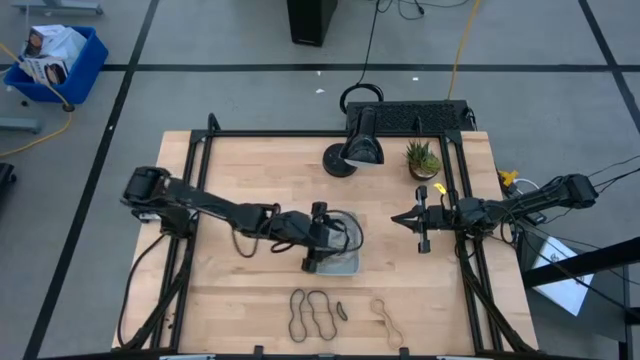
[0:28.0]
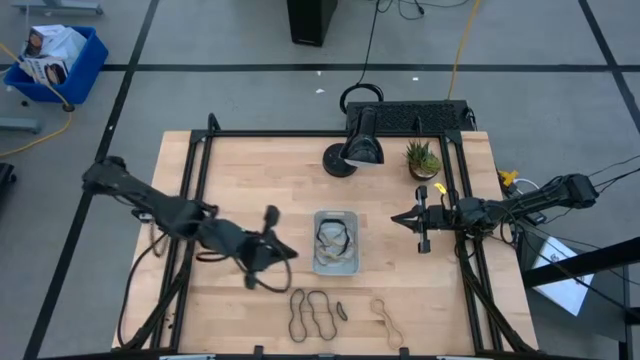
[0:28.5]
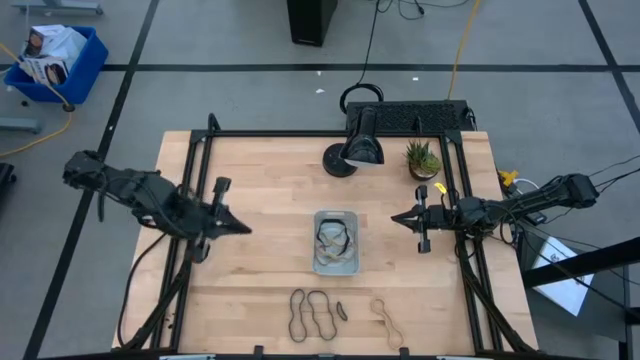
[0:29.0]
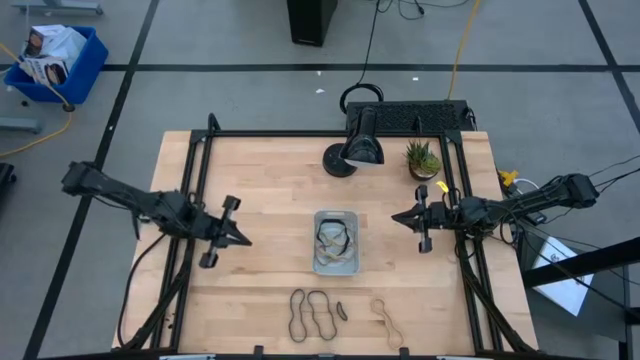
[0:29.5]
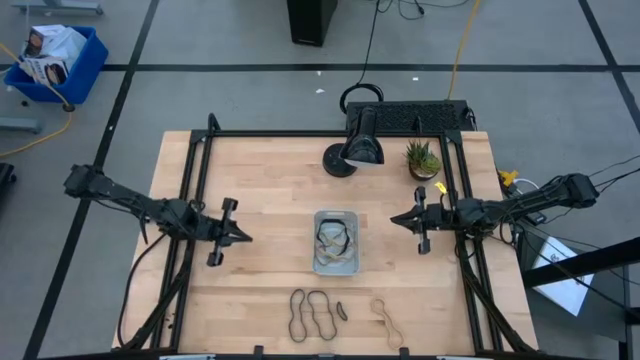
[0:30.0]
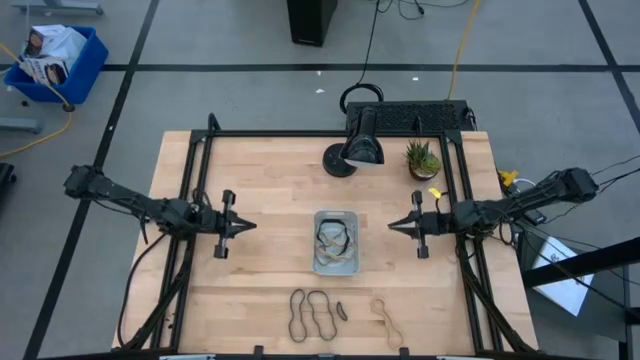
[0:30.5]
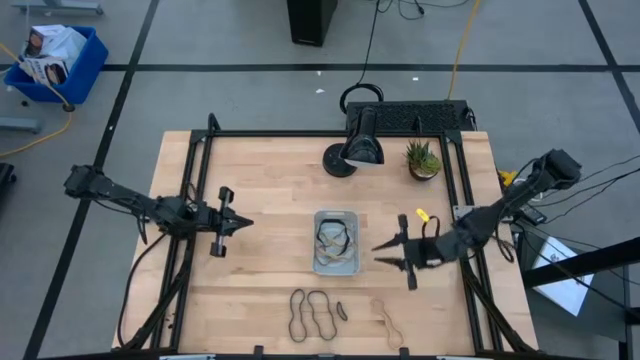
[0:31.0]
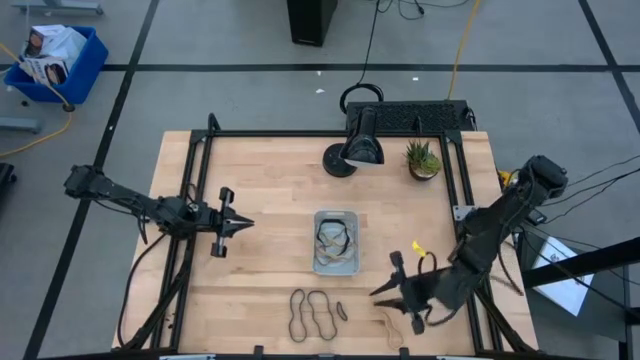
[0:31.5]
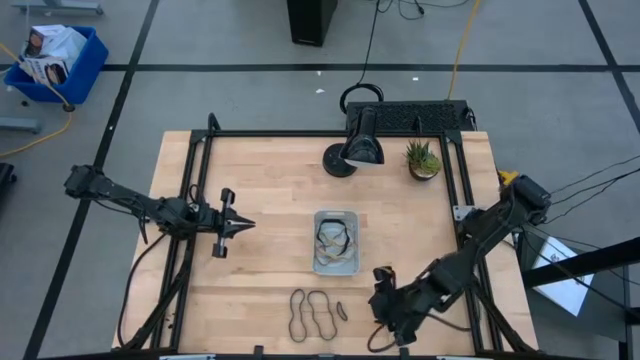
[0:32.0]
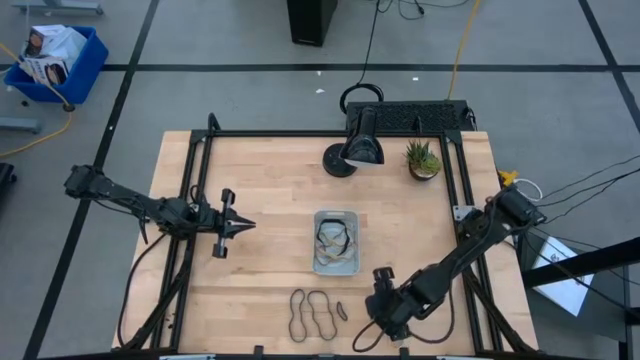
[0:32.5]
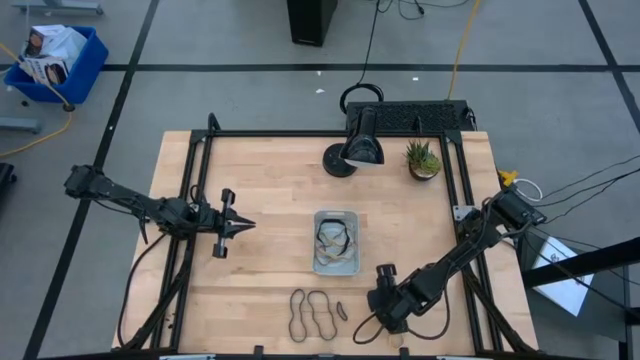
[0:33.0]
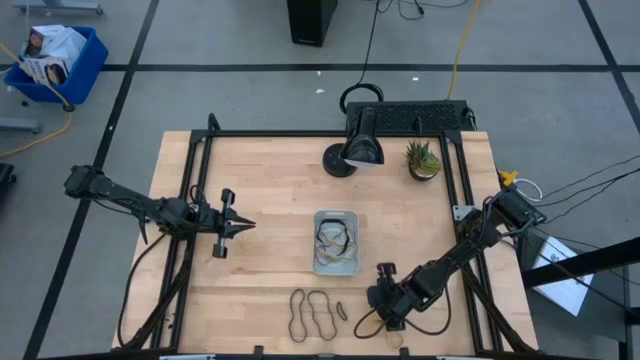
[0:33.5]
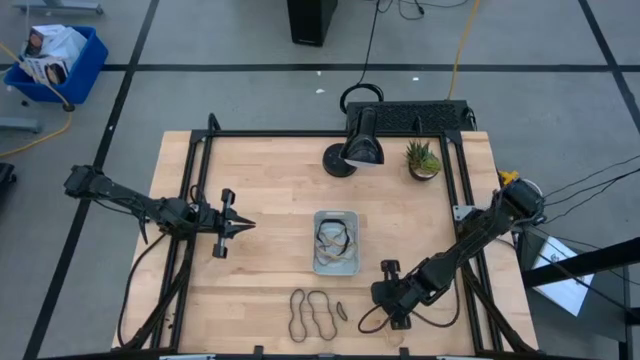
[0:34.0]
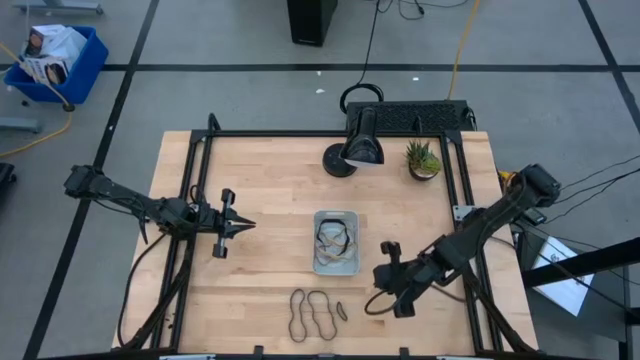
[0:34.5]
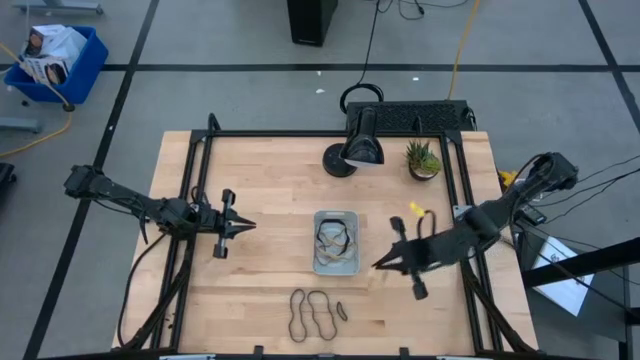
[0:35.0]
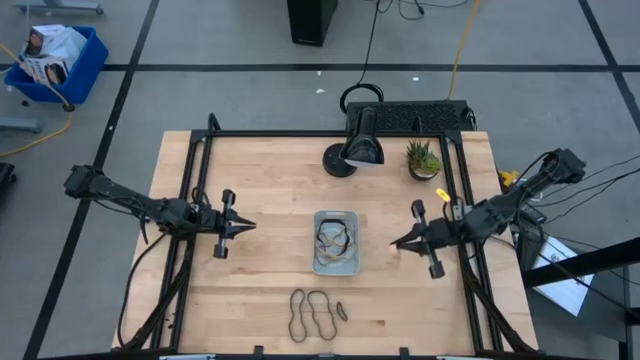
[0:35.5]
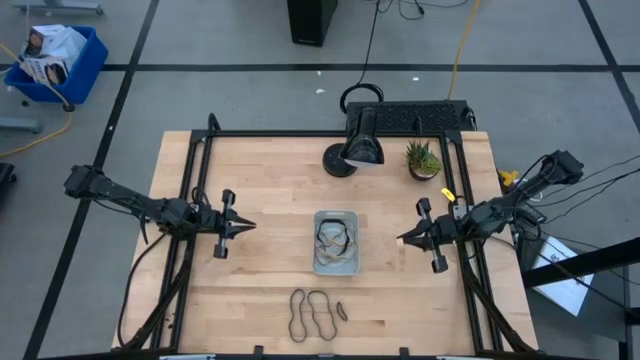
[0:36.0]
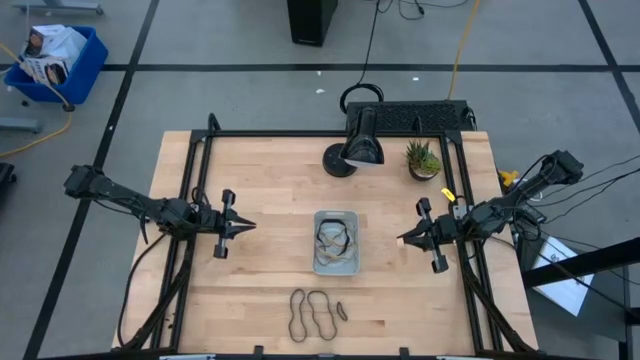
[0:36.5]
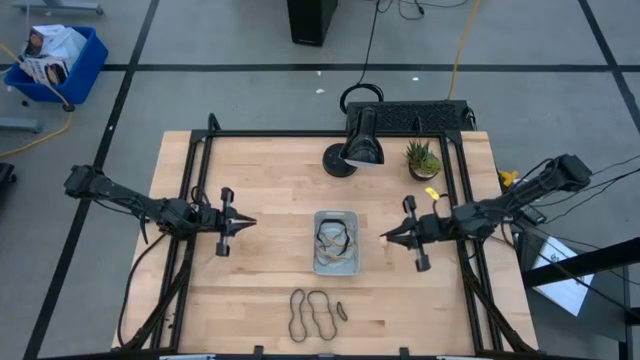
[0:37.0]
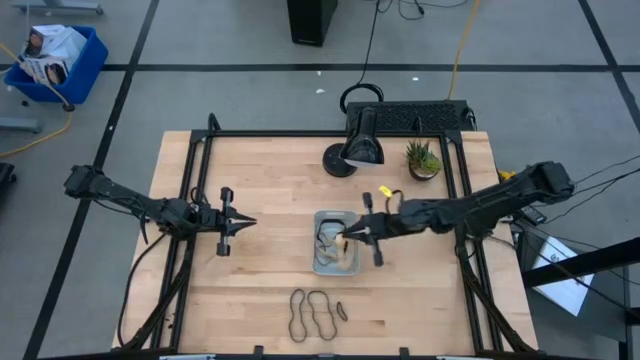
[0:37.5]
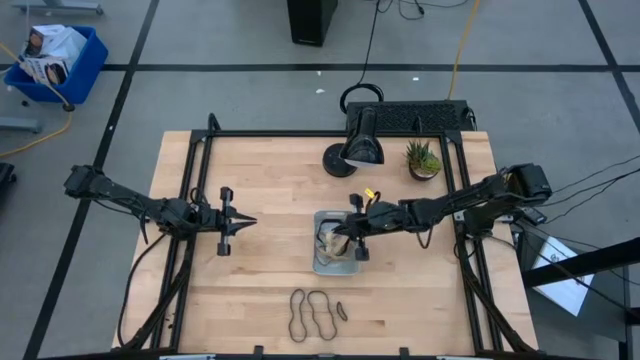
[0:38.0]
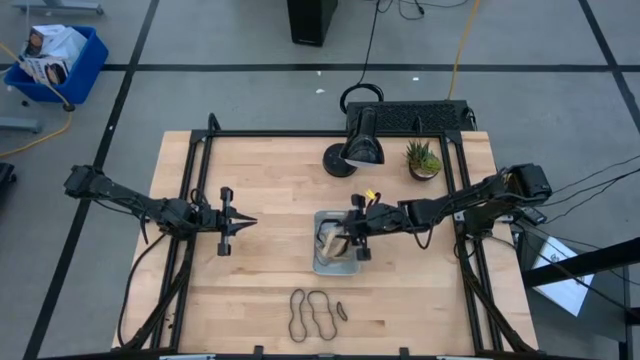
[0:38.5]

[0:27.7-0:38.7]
Task: Pick and place rubber bands into bin
Put the brown rubber band into the gray container

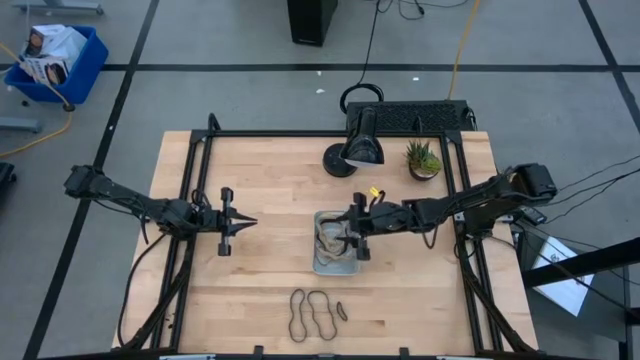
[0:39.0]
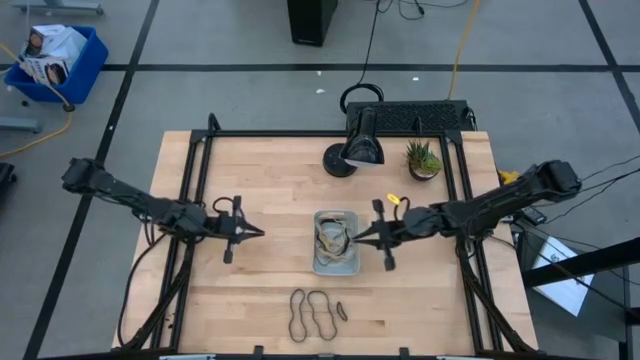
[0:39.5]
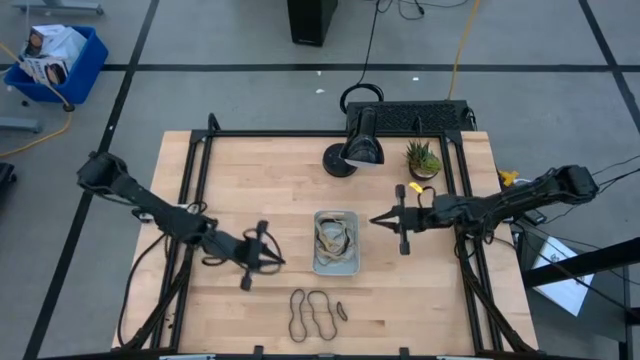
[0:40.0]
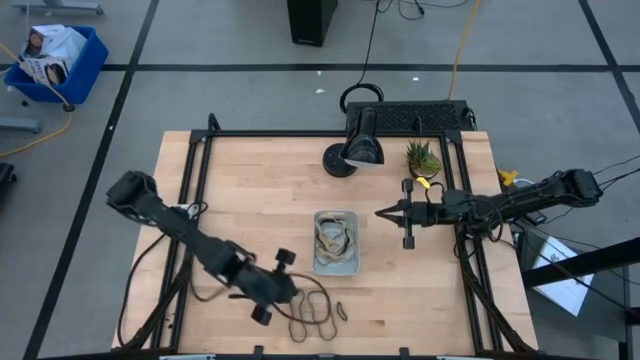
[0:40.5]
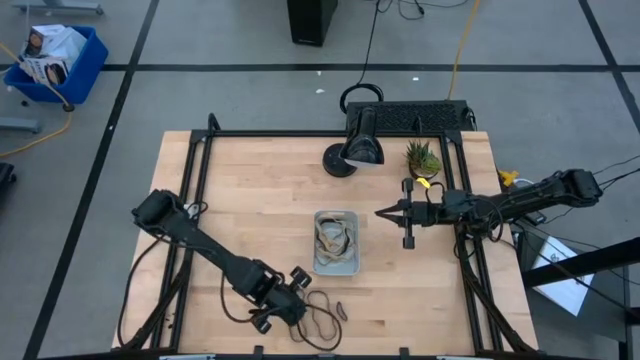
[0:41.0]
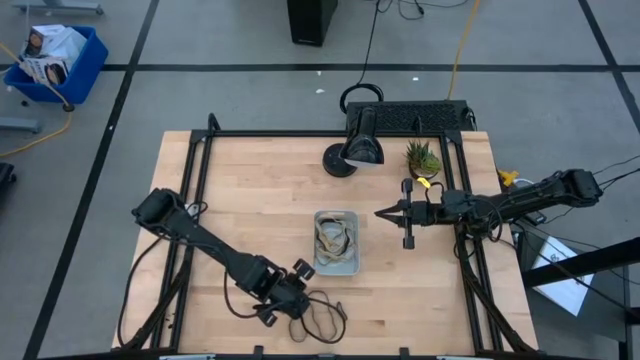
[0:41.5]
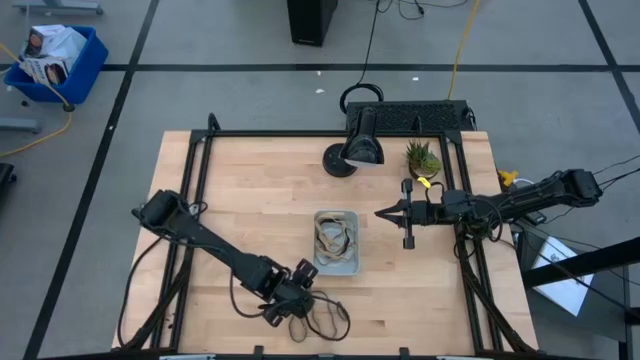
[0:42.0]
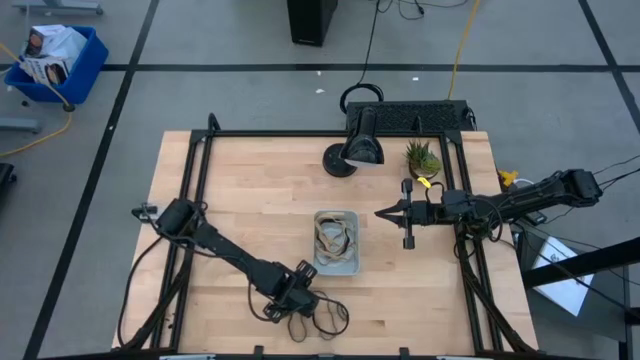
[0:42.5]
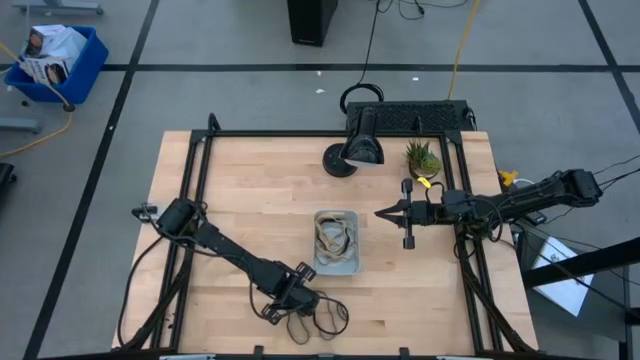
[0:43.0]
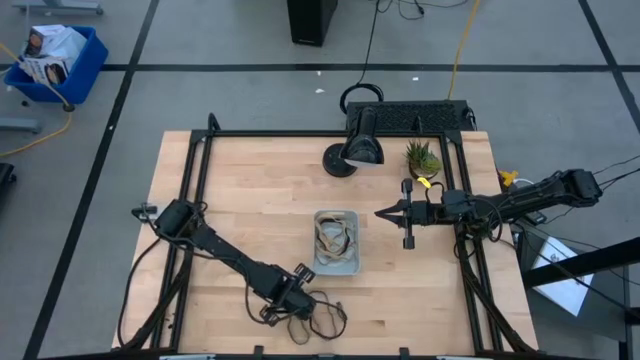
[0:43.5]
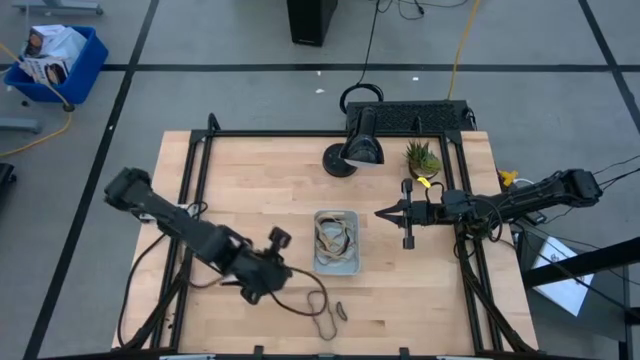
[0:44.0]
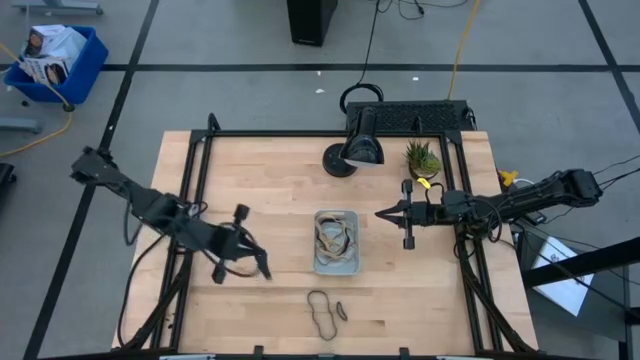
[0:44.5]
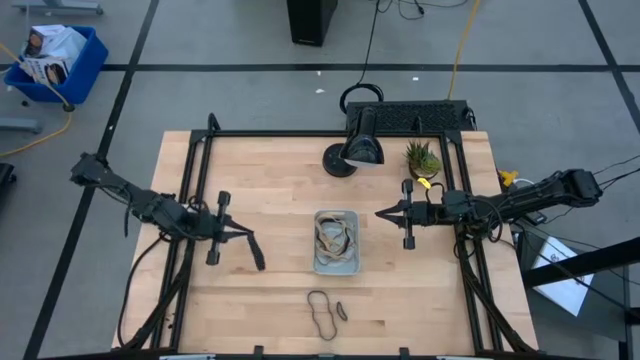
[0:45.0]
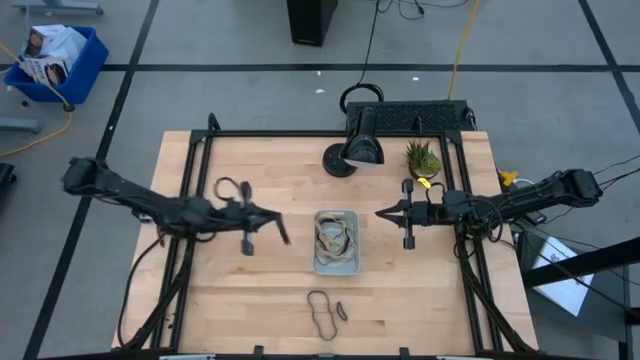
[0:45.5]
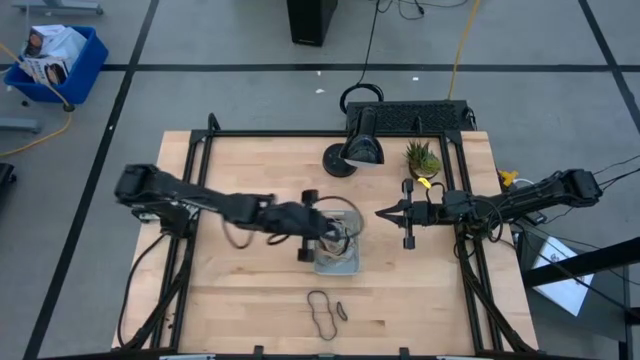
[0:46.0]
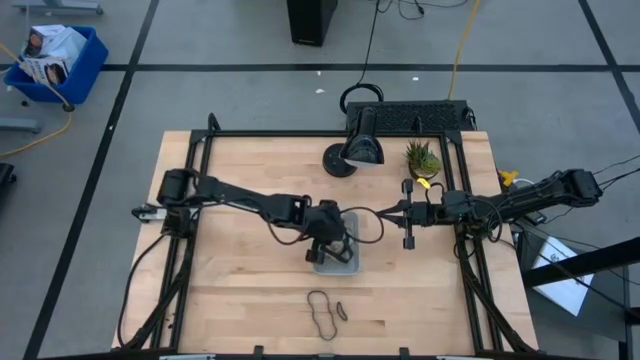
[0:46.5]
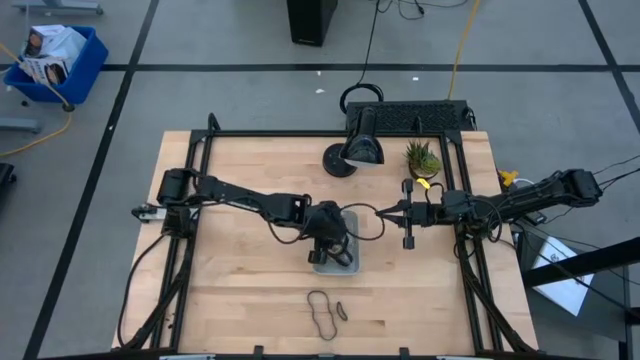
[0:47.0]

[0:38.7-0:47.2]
Put the black rubber band into the gray container
